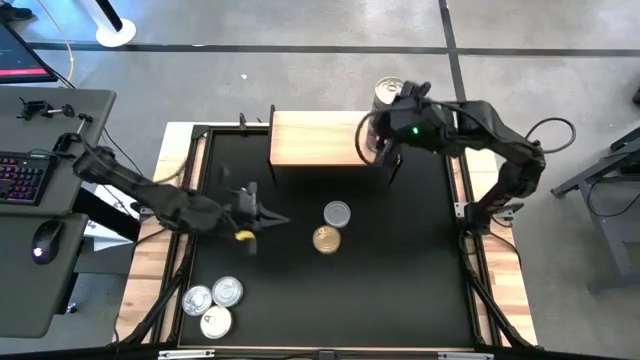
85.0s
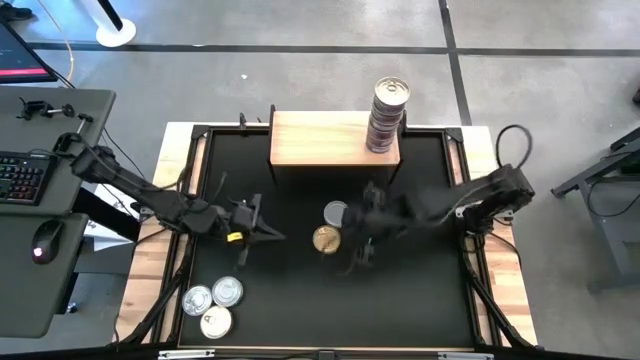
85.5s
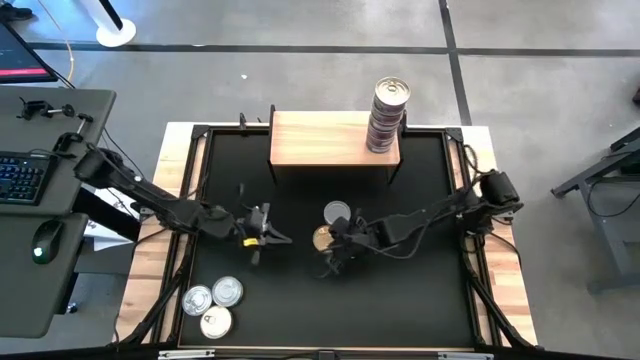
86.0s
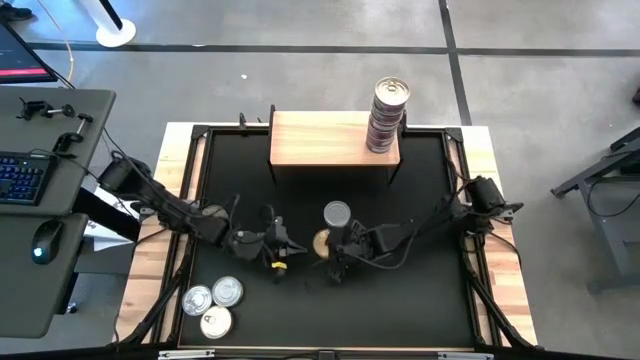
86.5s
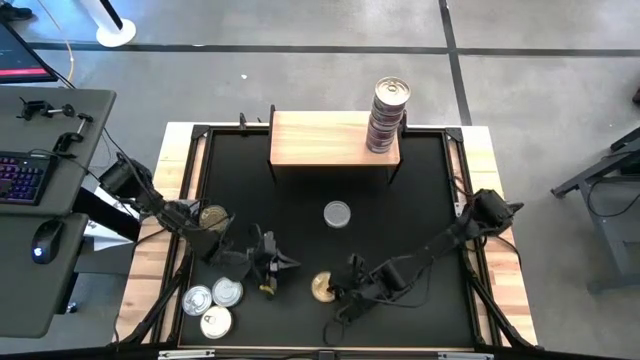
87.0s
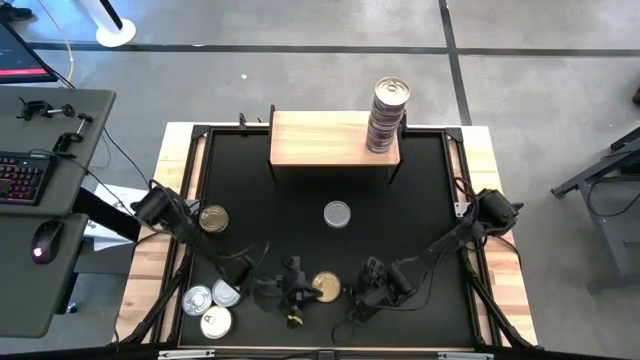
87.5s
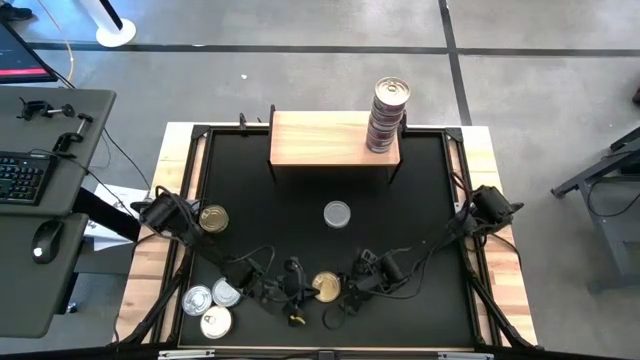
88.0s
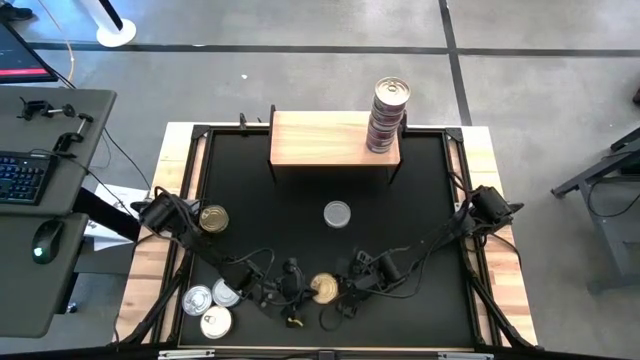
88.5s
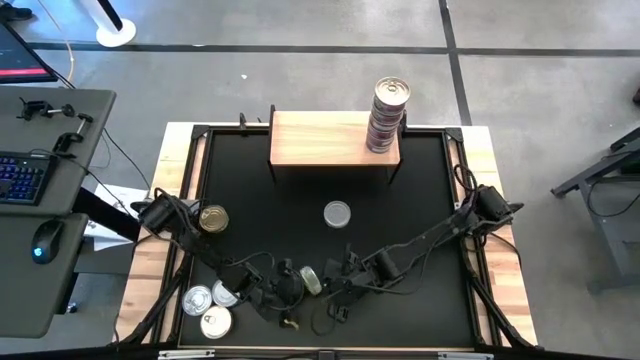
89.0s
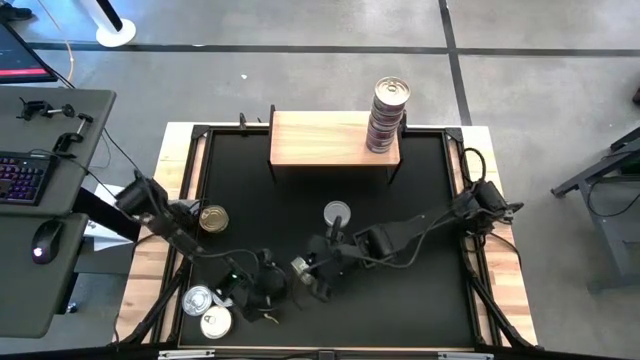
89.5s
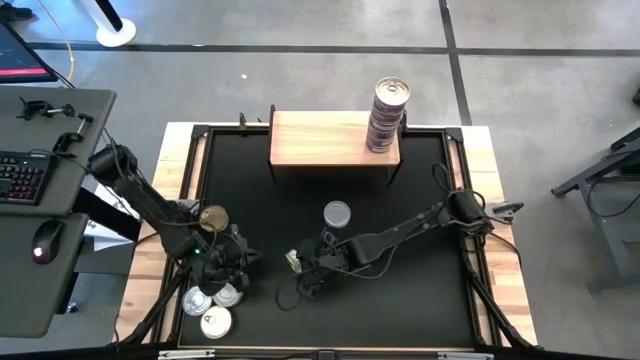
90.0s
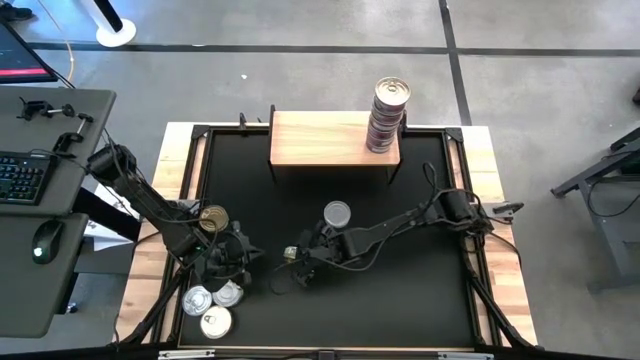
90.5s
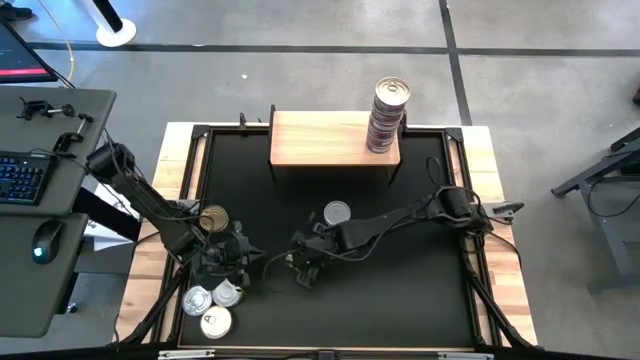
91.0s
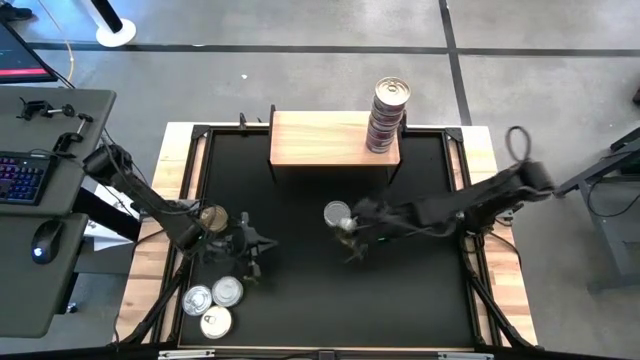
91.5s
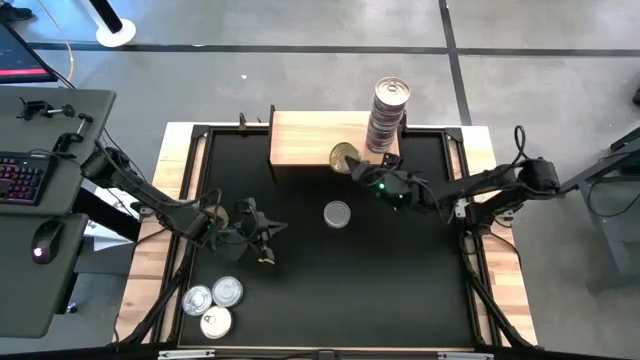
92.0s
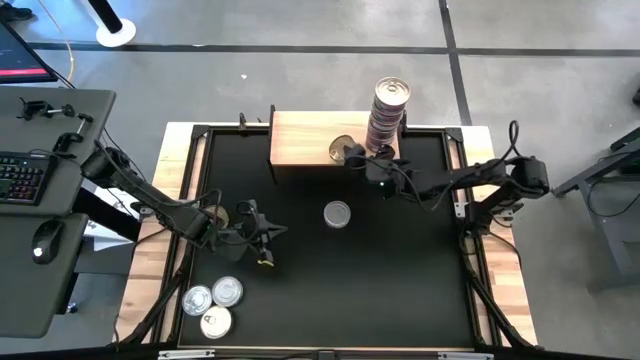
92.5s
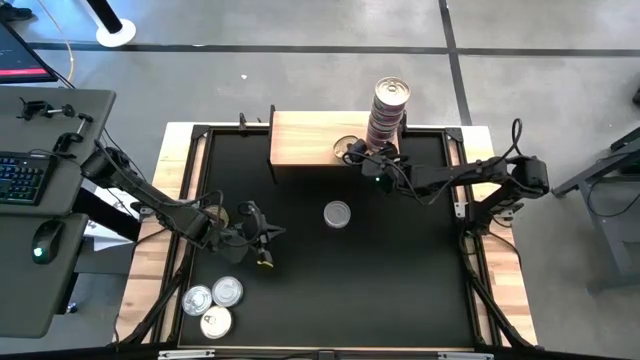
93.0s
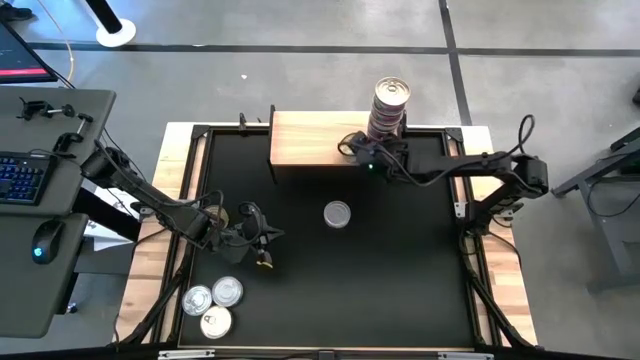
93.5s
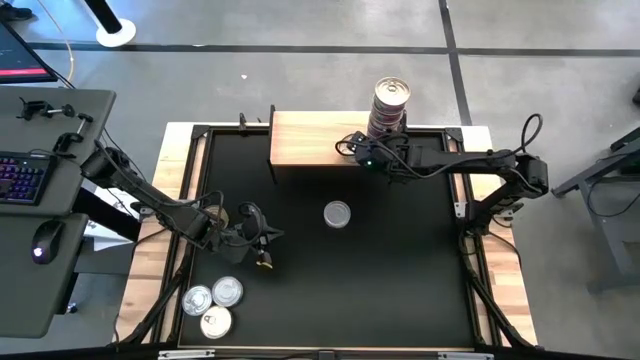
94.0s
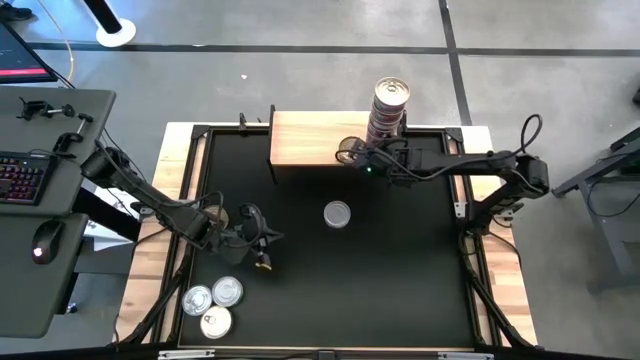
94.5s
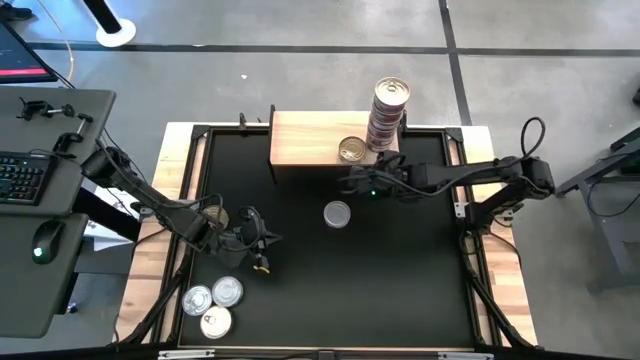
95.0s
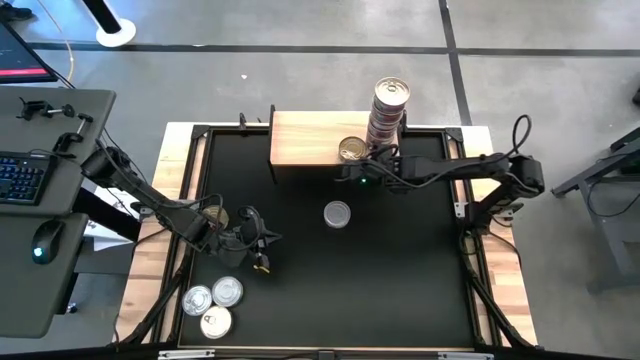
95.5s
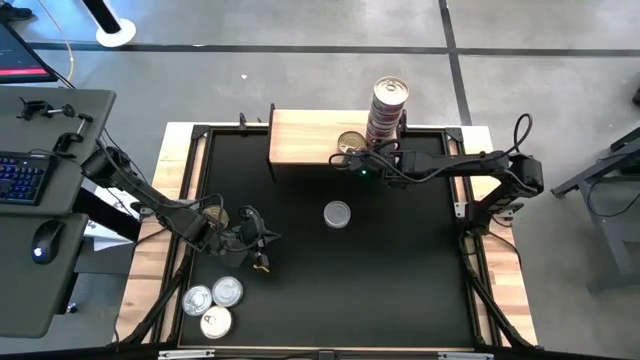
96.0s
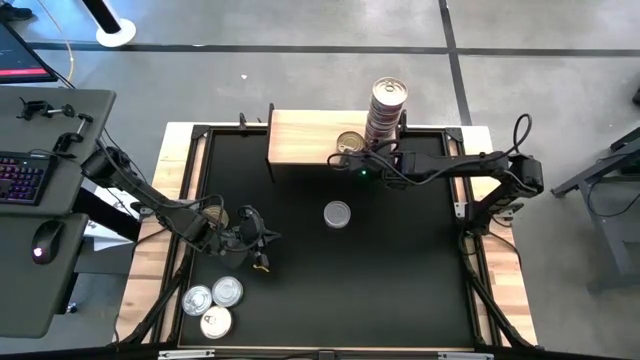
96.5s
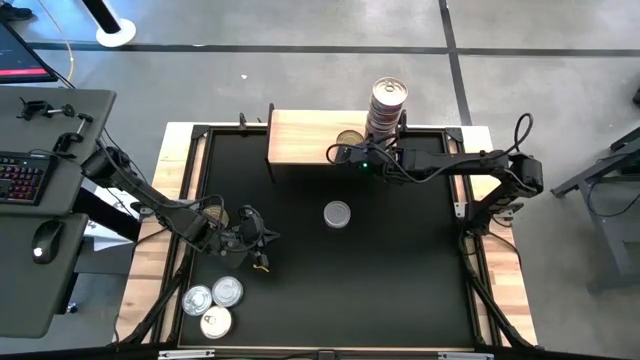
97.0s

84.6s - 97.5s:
Task: Stack canned seafood by type on shelf
Put the green tuna can on the shelf

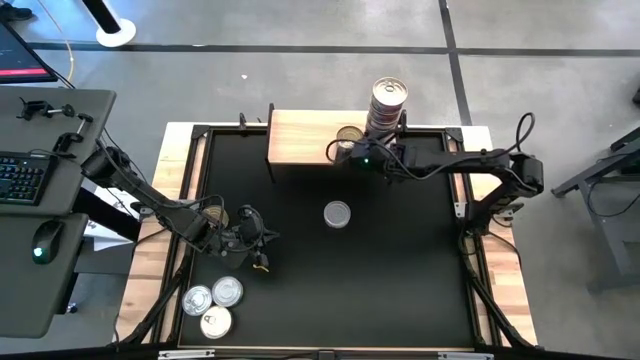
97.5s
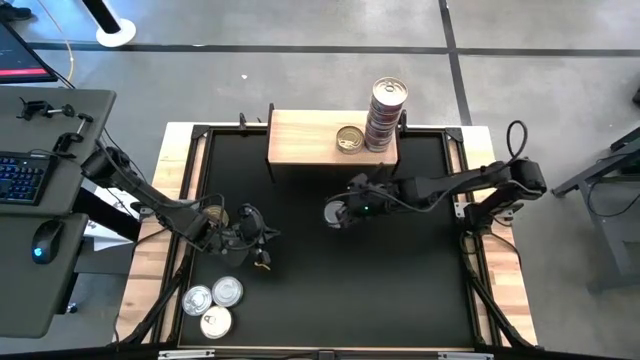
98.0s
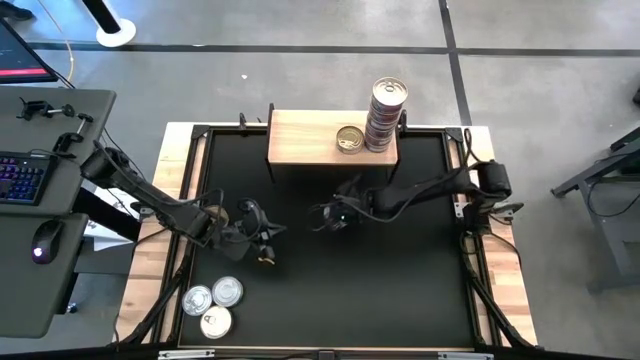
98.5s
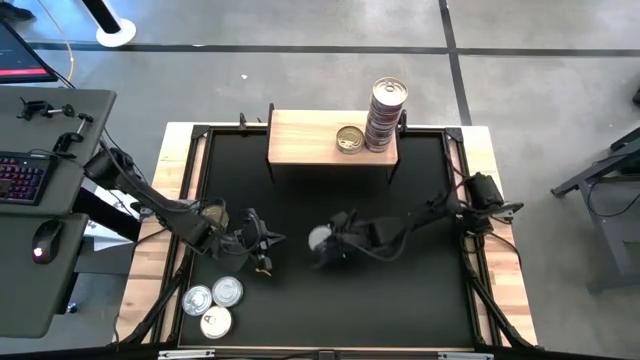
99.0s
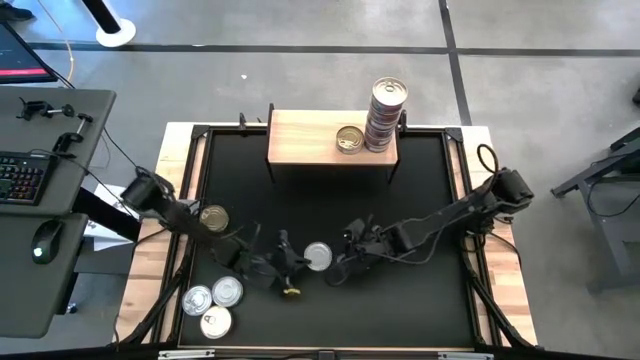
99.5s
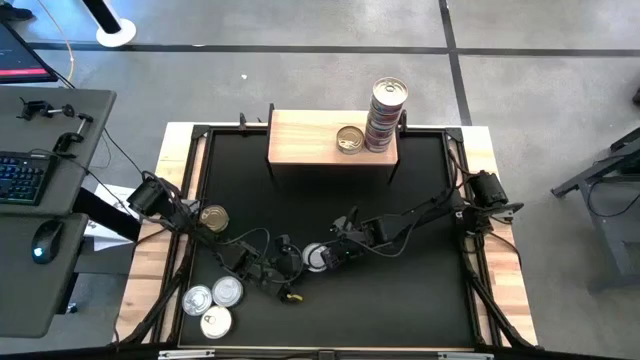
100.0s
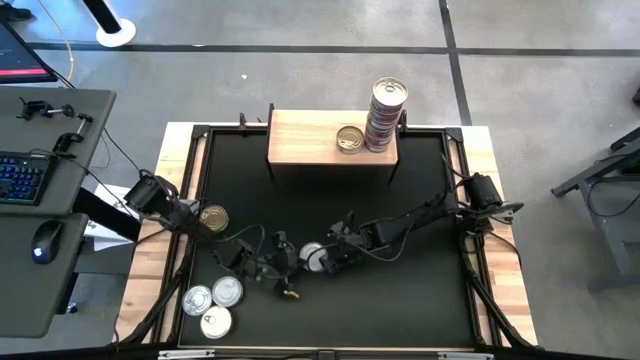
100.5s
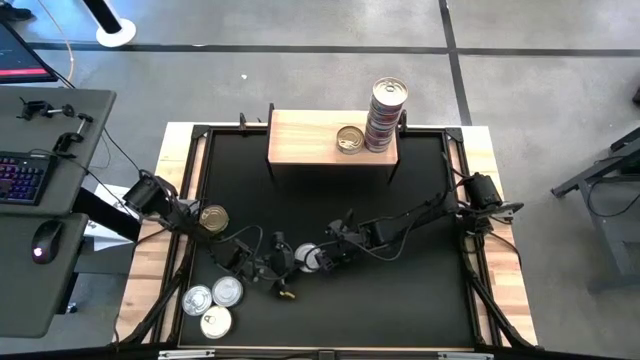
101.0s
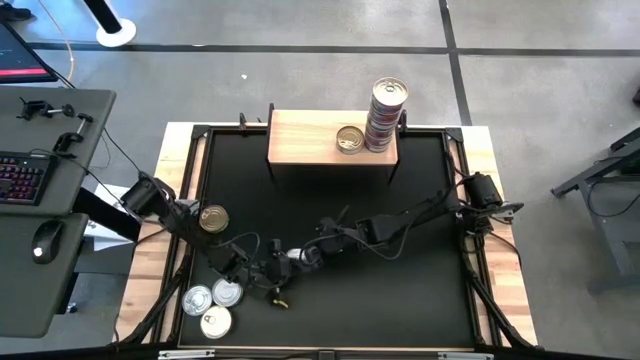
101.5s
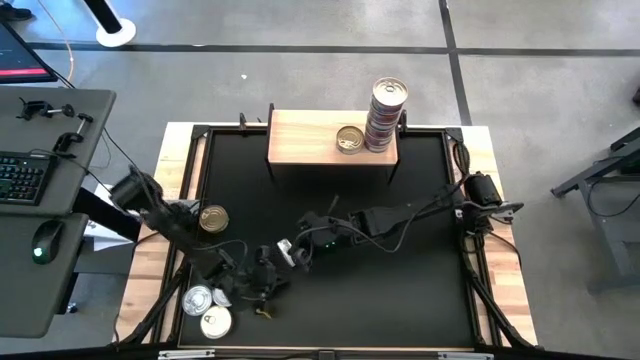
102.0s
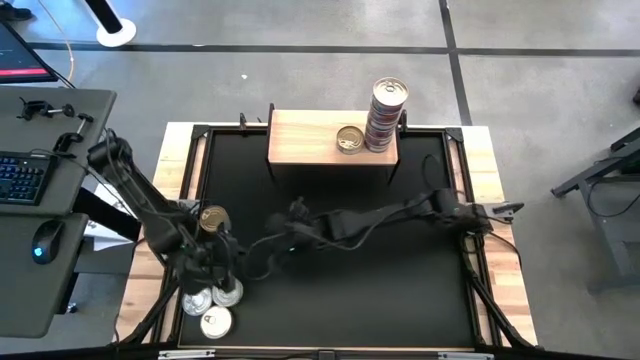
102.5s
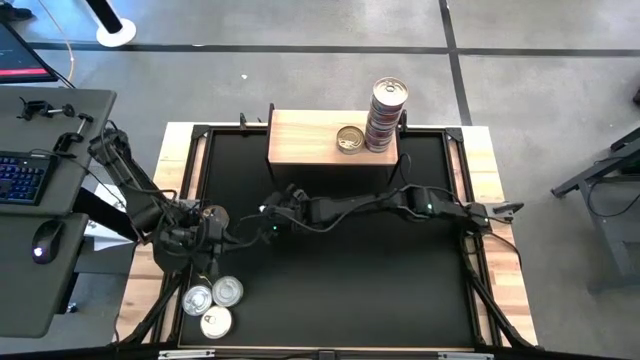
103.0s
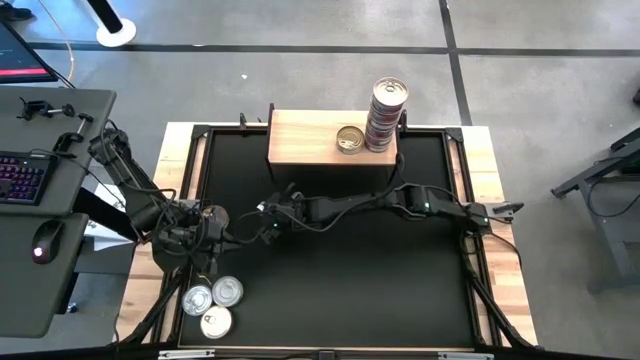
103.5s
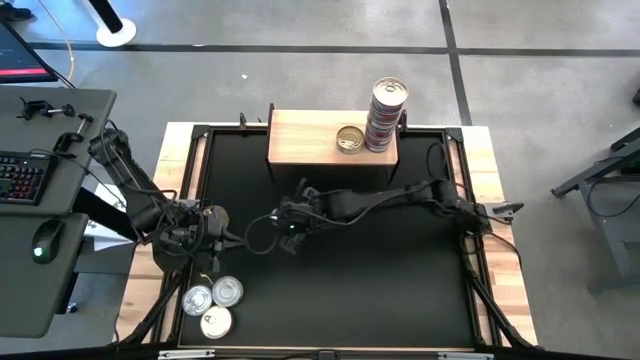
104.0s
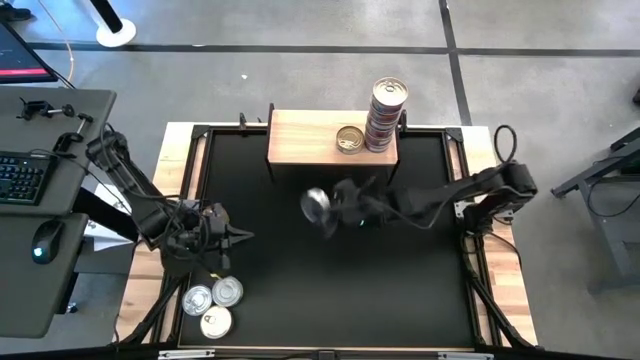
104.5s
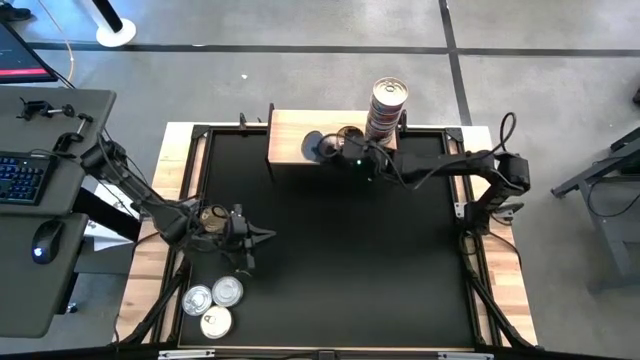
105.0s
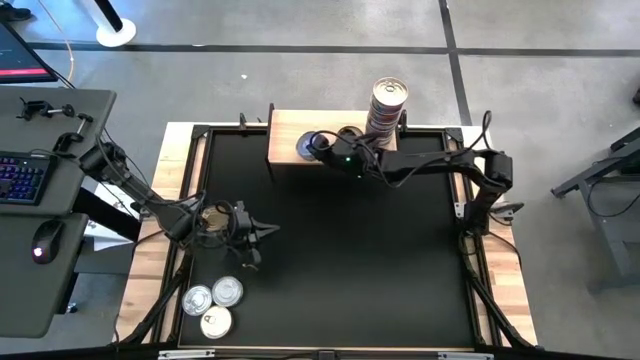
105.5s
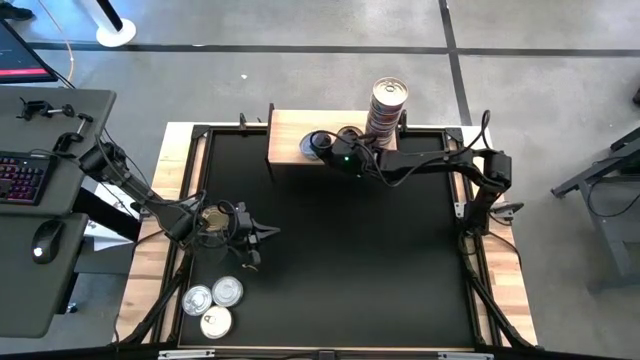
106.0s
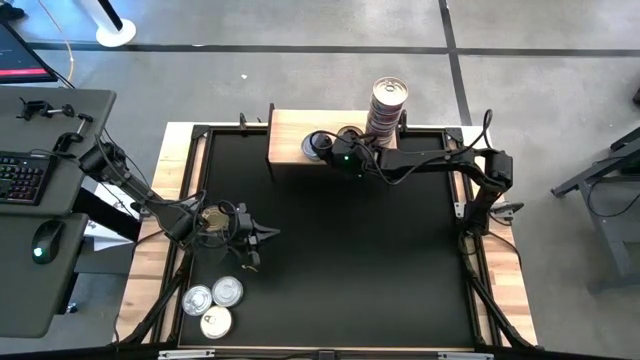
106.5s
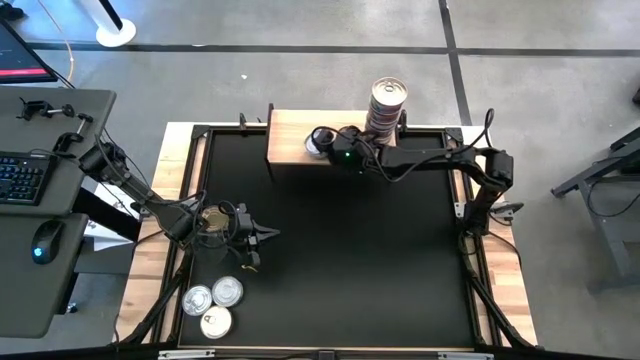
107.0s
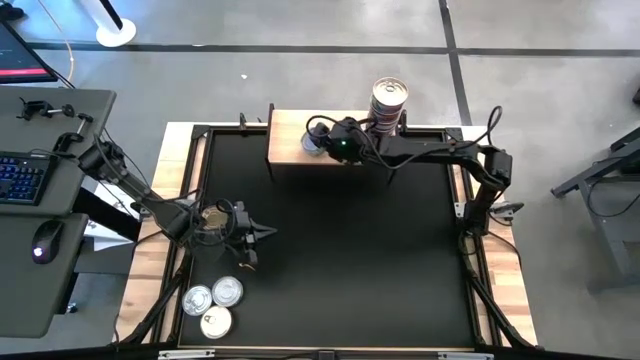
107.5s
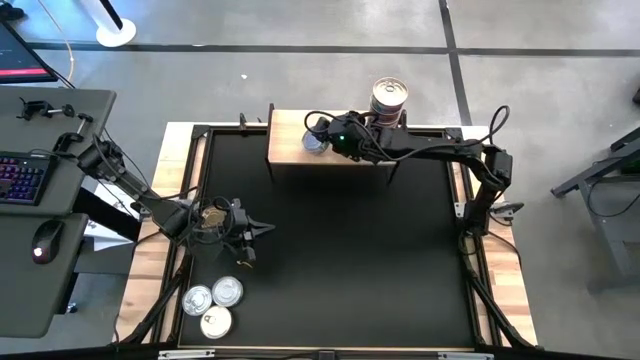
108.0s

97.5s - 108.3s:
Put the white and green tuna can on the shelf
